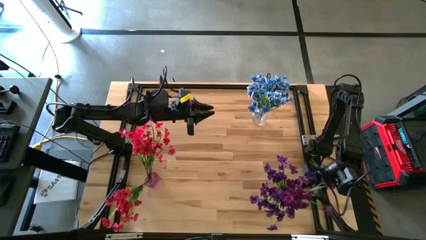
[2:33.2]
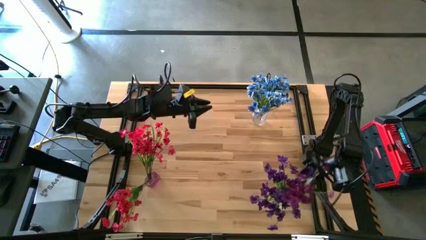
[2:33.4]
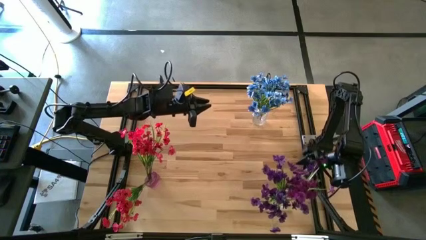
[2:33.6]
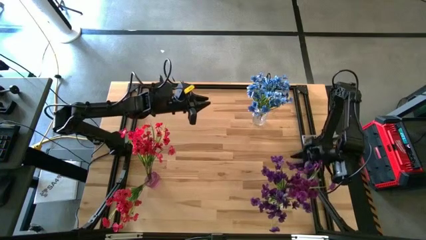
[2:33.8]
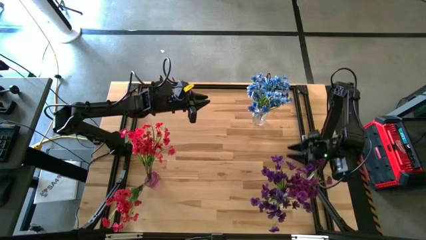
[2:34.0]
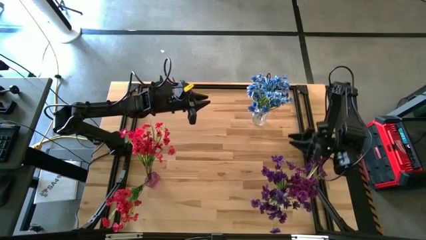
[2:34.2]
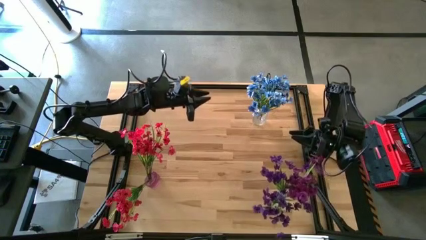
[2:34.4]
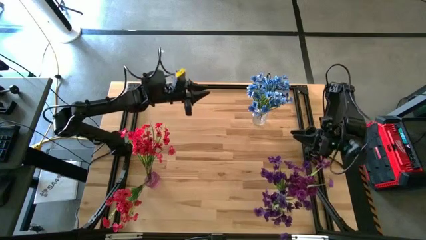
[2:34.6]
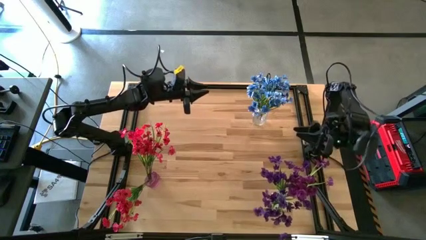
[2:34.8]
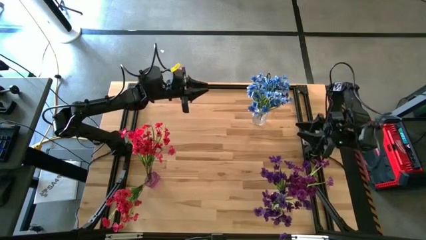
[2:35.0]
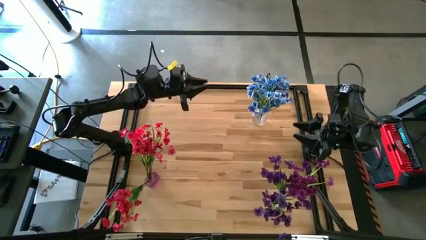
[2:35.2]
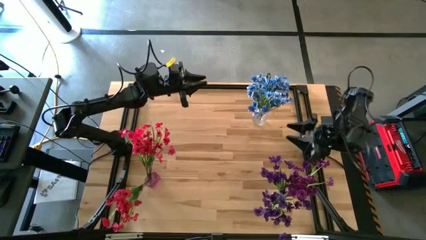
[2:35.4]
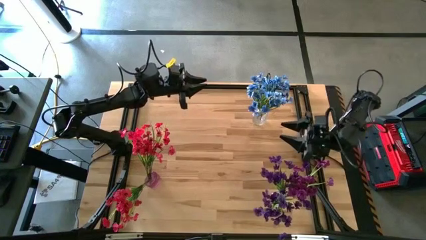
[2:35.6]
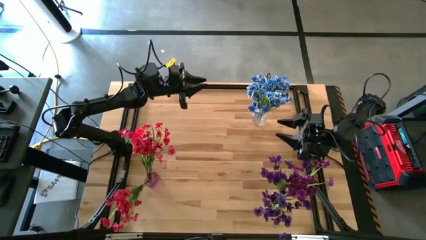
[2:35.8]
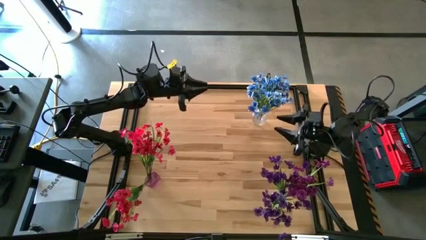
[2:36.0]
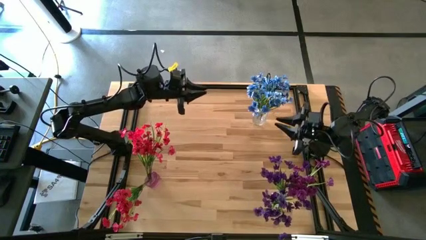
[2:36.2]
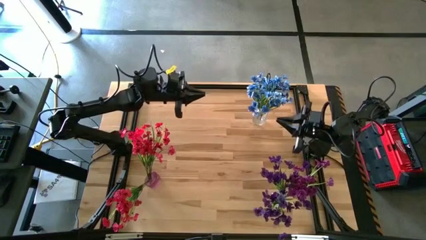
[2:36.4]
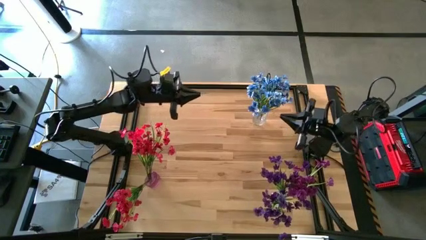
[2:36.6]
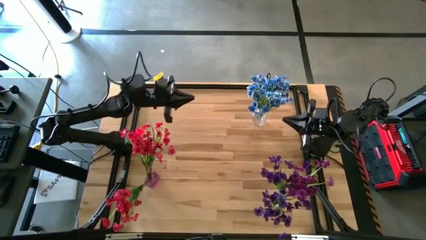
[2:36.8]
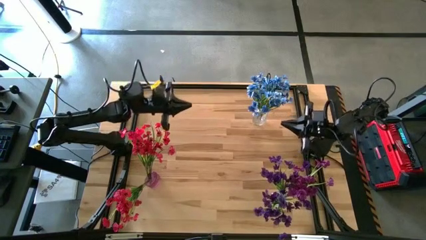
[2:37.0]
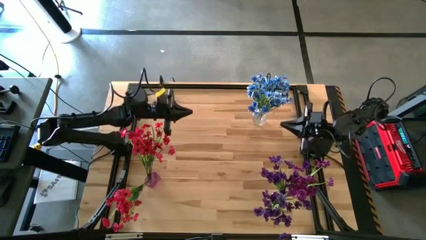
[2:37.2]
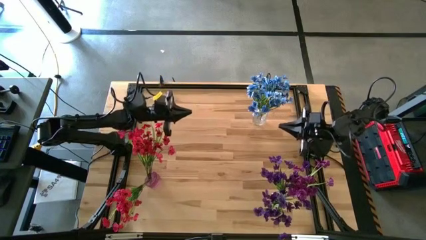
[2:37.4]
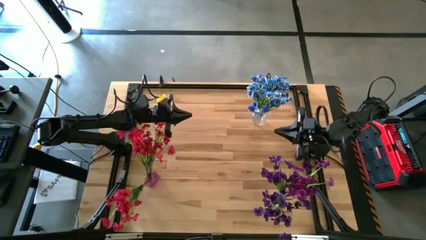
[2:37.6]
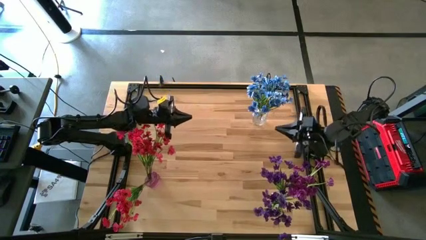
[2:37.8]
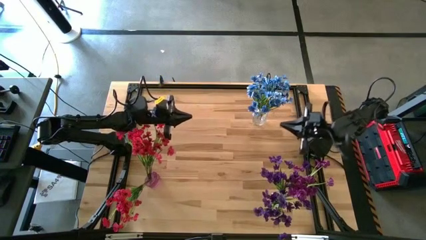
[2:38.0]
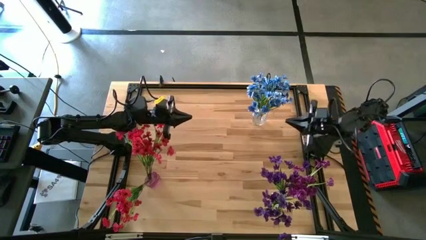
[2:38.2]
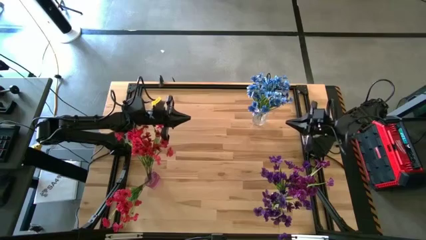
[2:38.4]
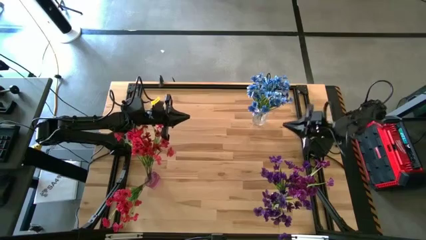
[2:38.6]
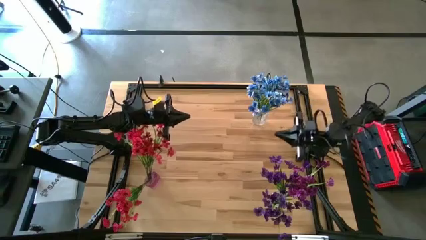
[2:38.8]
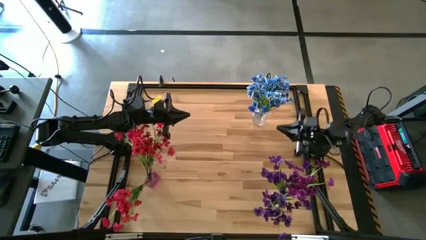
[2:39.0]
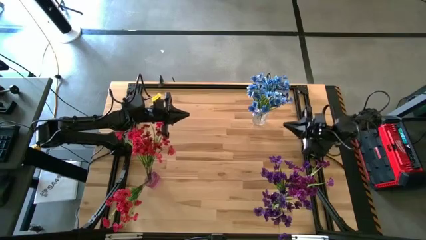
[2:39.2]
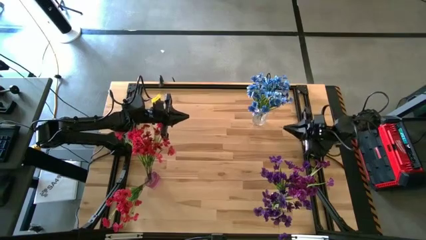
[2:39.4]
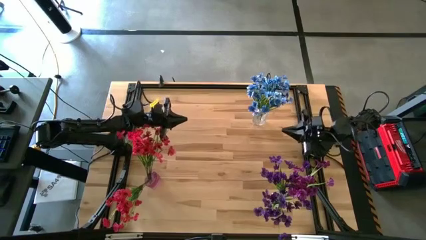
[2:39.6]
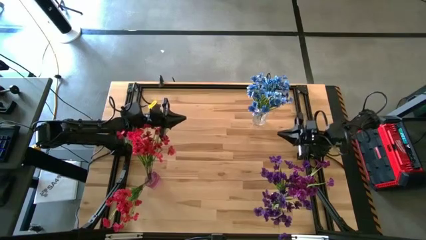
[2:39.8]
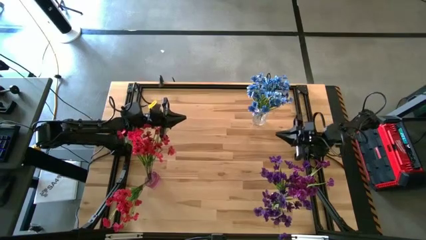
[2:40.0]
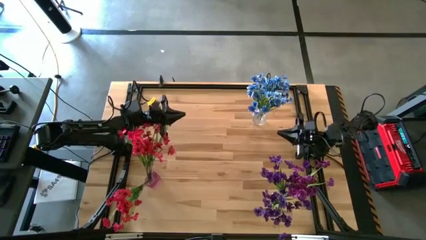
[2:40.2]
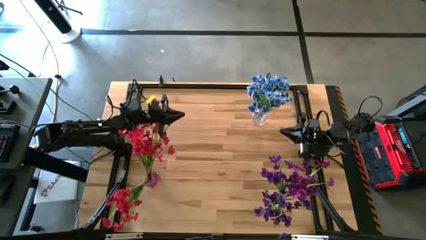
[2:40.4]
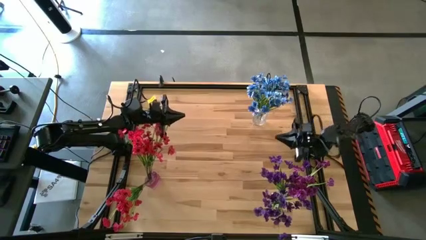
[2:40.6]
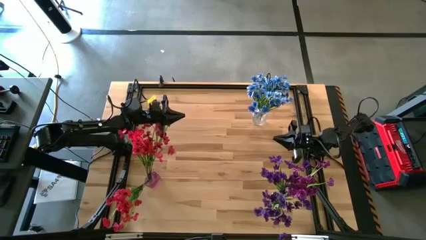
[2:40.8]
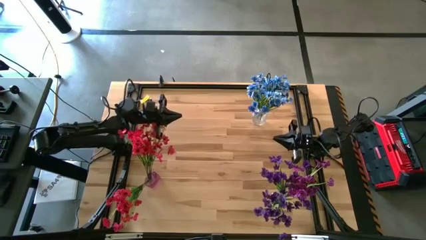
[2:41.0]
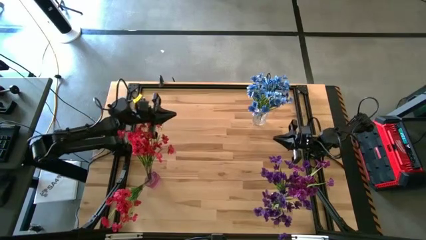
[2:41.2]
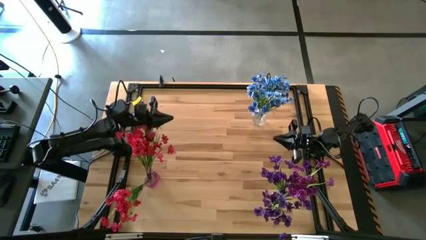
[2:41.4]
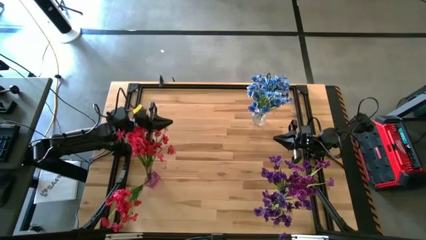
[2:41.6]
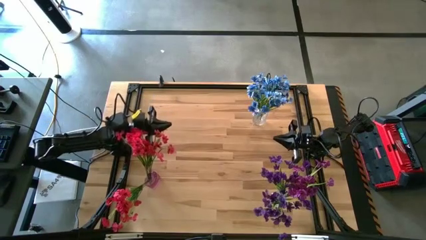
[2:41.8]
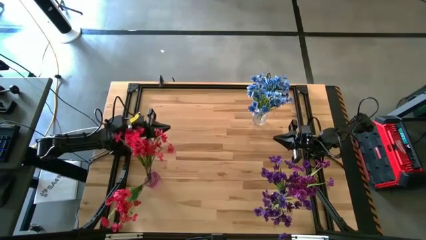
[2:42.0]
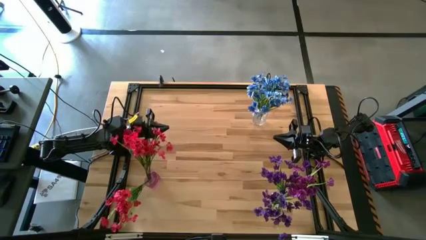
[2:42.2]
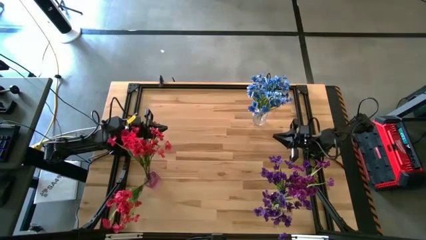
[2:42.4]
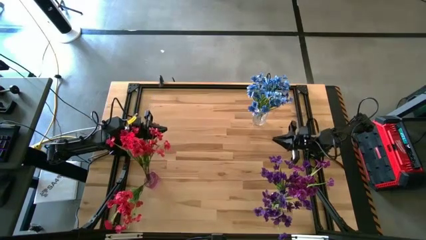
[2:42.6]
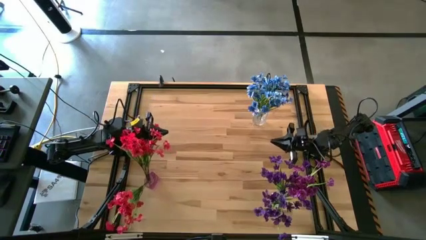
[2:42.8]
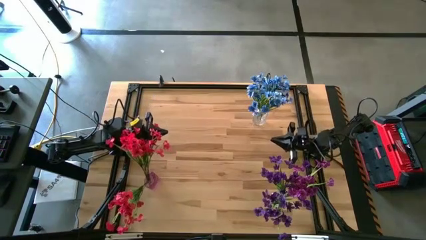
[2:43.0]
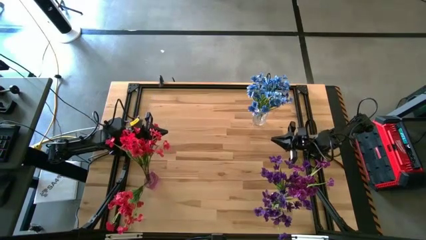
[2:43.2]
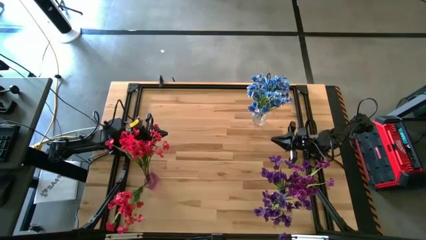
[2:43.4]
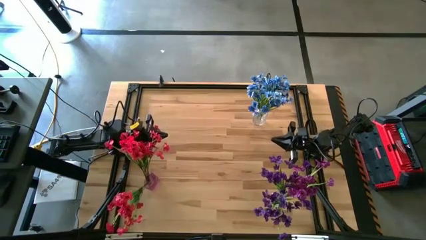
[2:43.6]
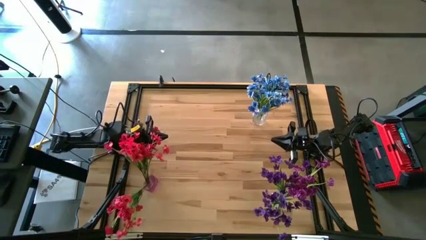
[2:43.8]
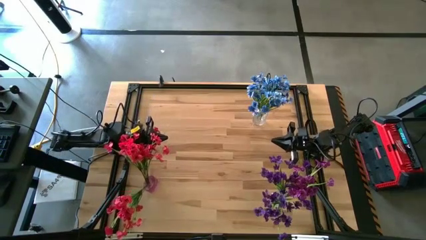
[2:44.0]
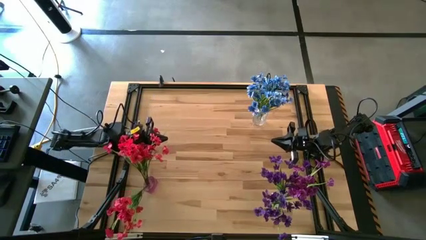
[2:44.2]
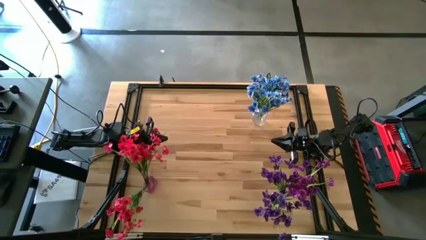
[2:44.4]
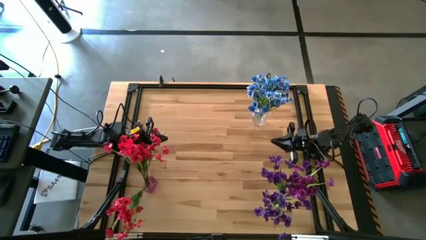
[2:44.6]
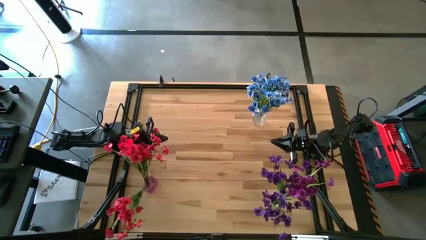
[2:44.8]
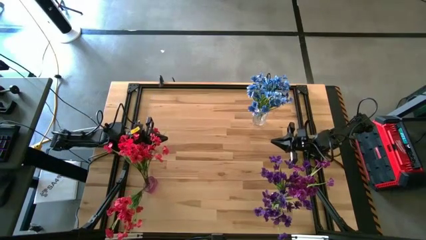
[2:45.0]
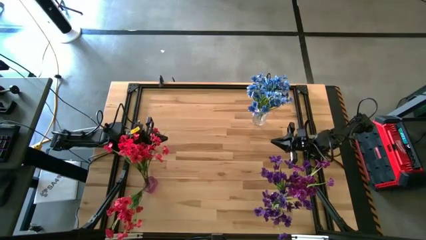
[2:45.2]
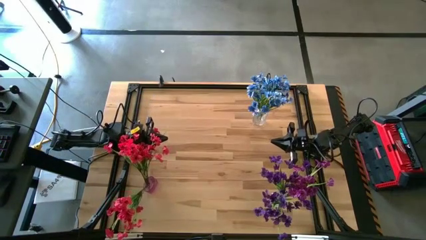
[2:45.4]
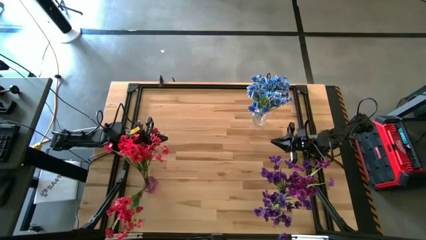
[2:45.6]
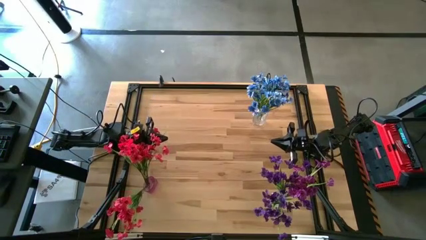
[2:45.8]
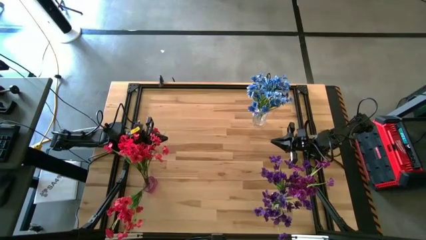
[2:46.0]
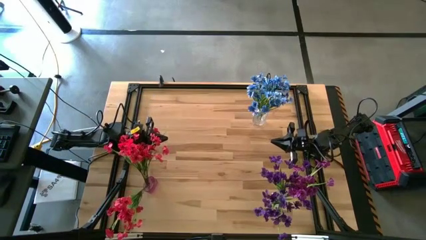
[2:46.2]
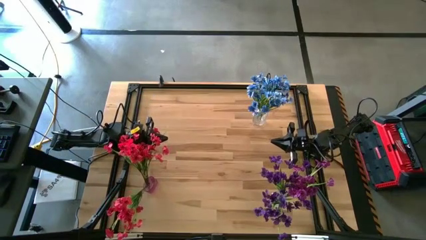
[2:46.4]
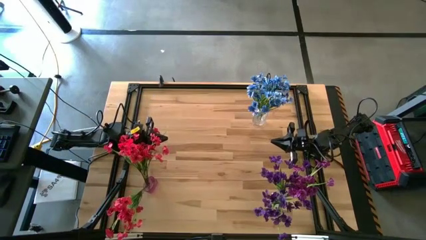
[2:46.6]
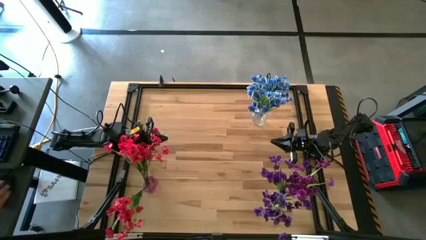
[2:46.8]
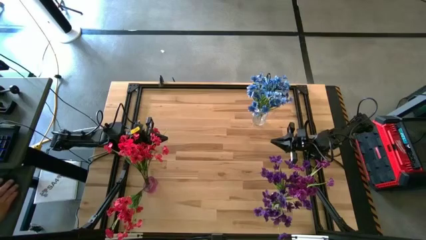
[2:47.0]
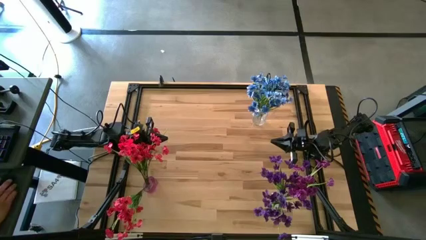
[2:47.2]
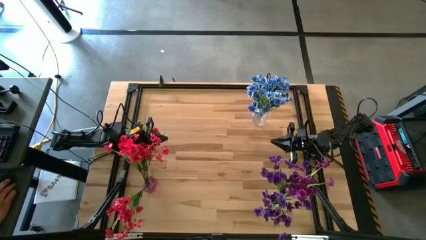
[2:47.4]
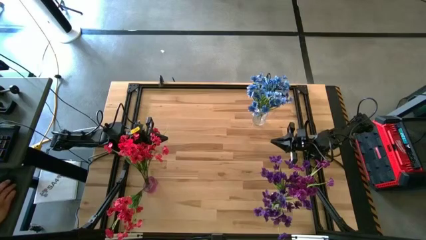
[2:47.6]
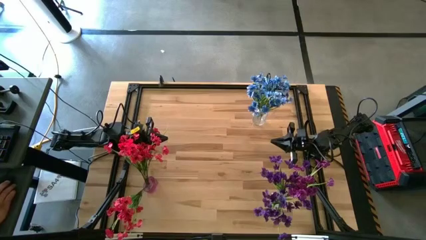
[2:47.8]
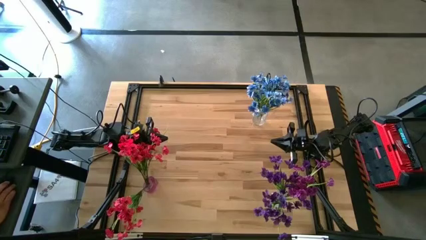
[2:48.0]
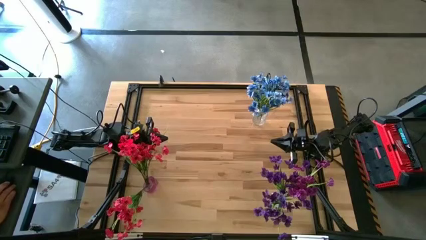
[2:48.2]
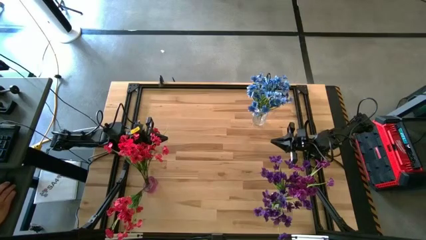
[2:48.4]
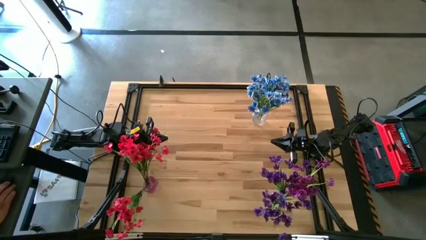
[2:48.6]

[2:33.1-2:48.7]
Task: Sort flowers into vase by color
Return to Home Position
